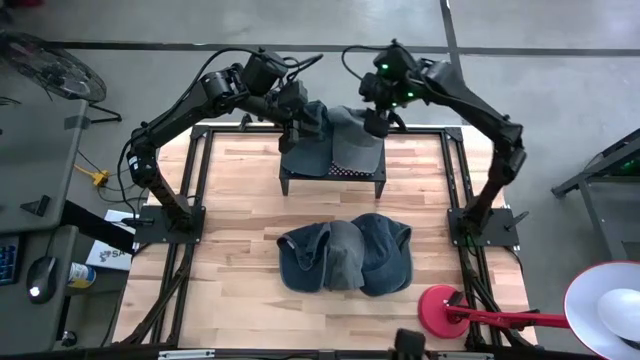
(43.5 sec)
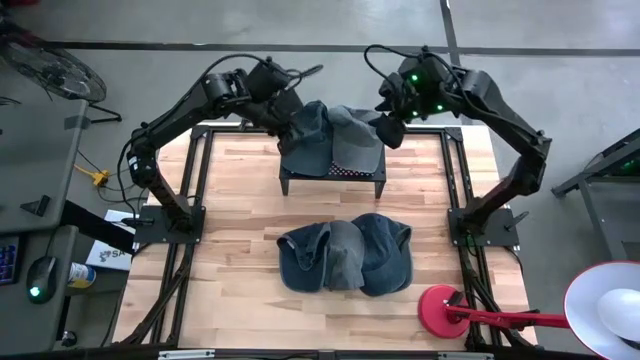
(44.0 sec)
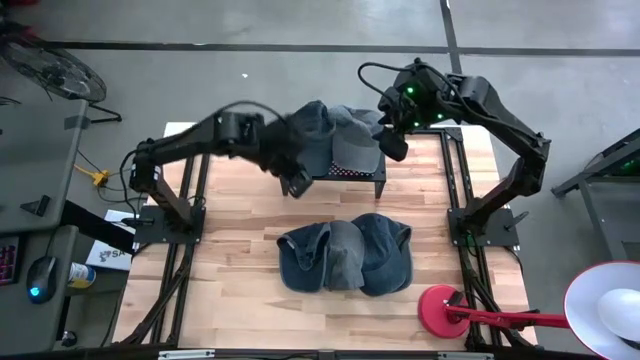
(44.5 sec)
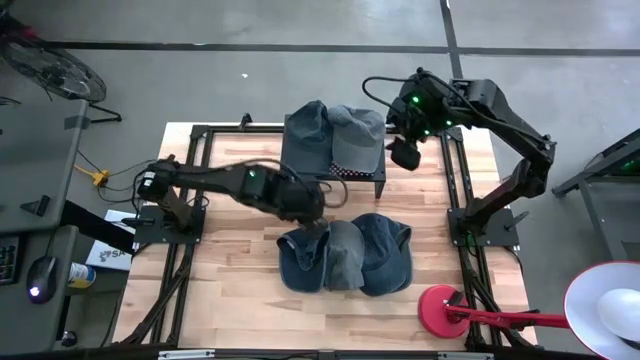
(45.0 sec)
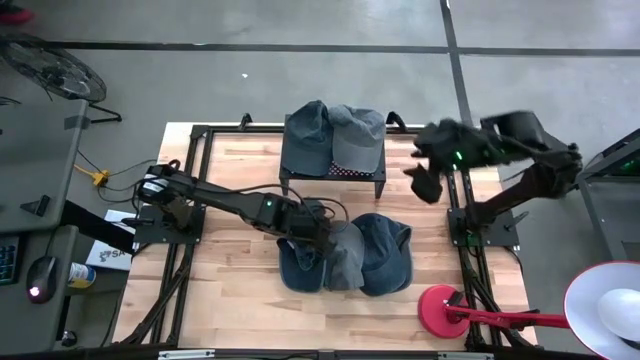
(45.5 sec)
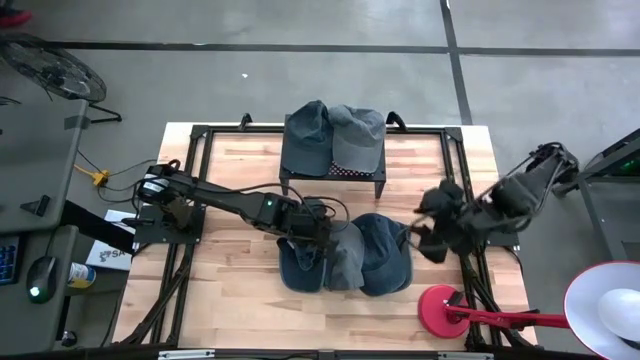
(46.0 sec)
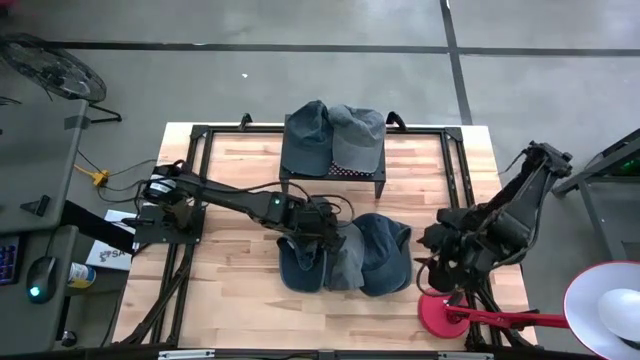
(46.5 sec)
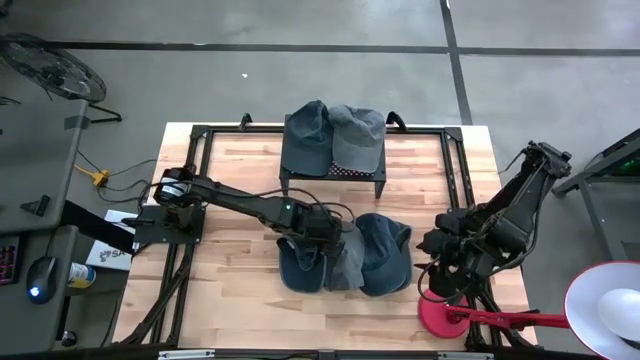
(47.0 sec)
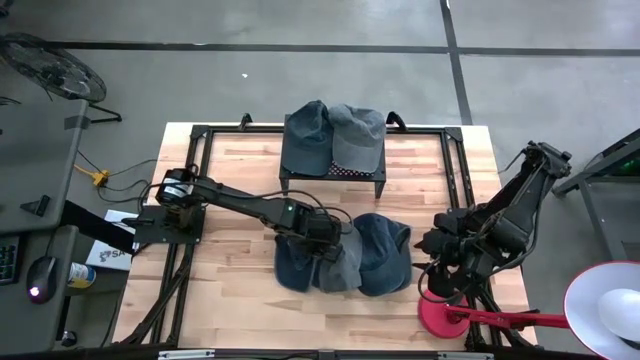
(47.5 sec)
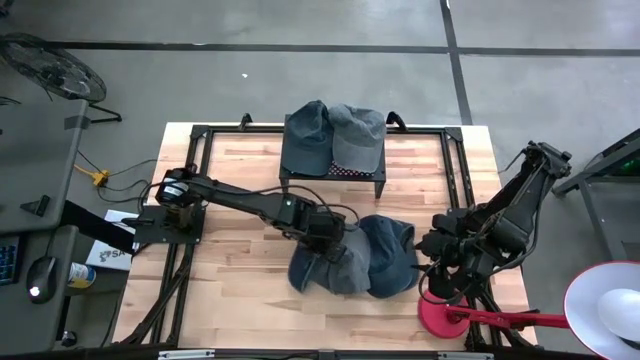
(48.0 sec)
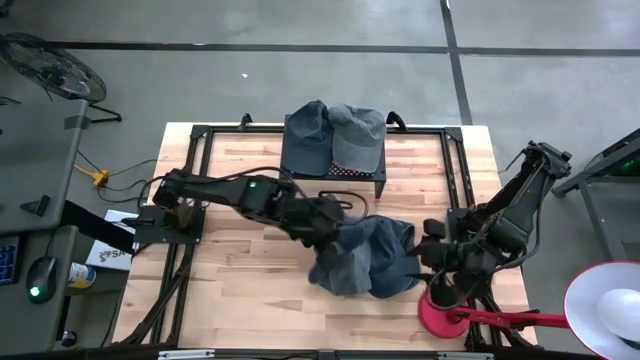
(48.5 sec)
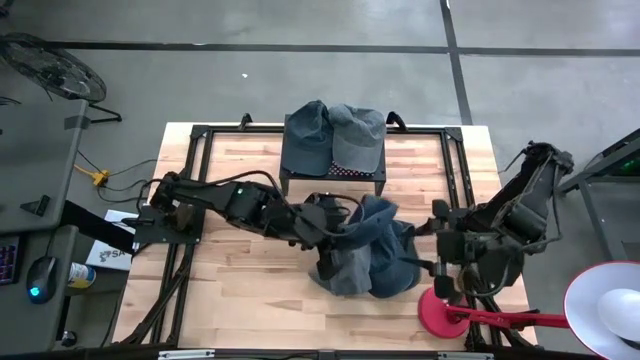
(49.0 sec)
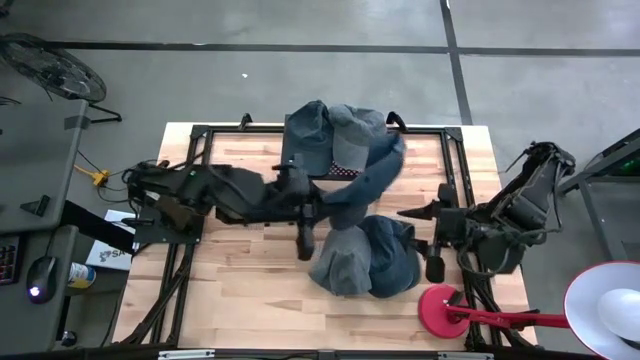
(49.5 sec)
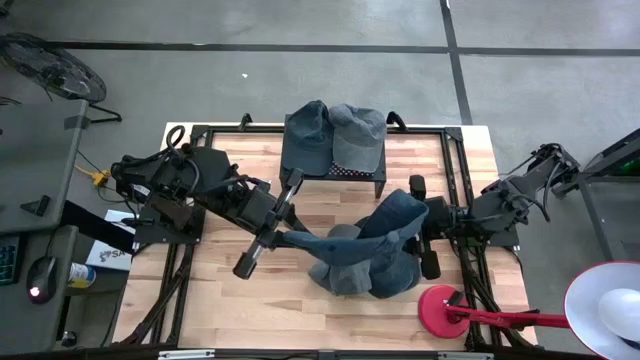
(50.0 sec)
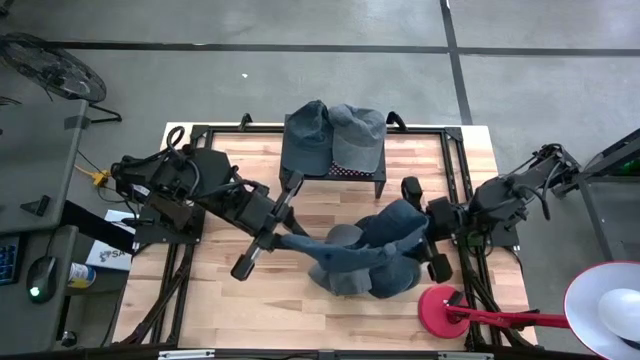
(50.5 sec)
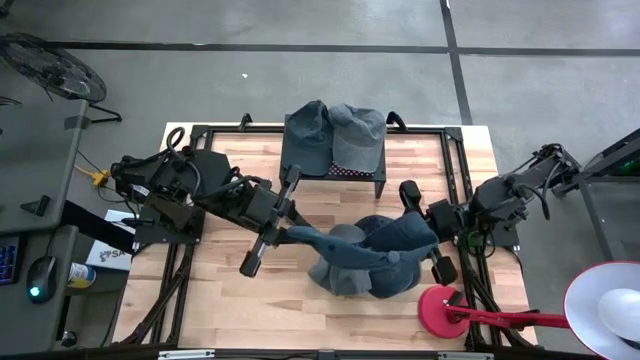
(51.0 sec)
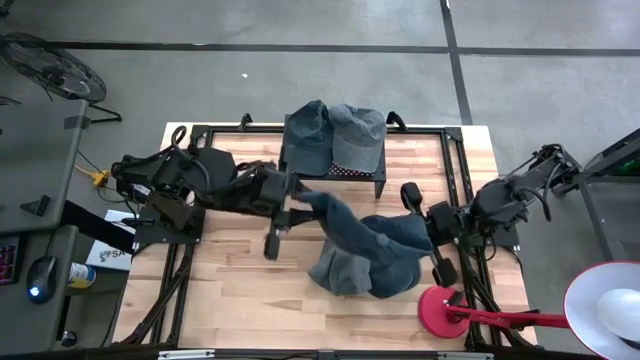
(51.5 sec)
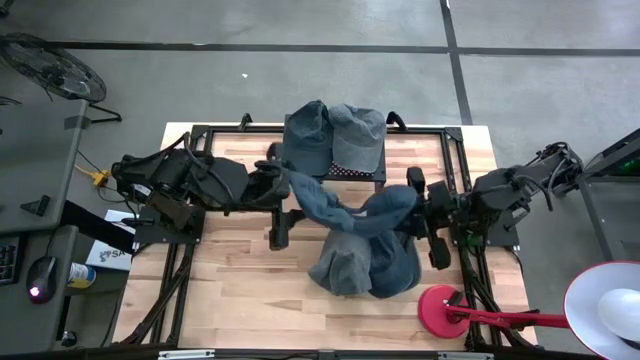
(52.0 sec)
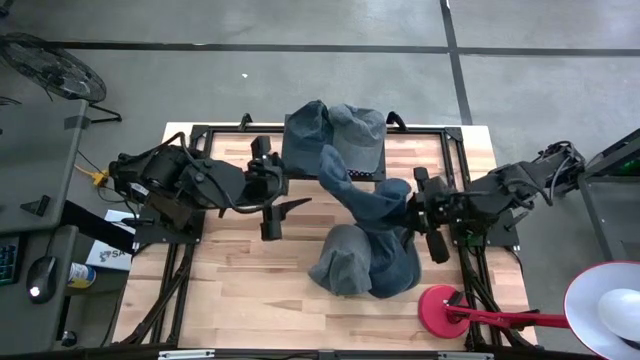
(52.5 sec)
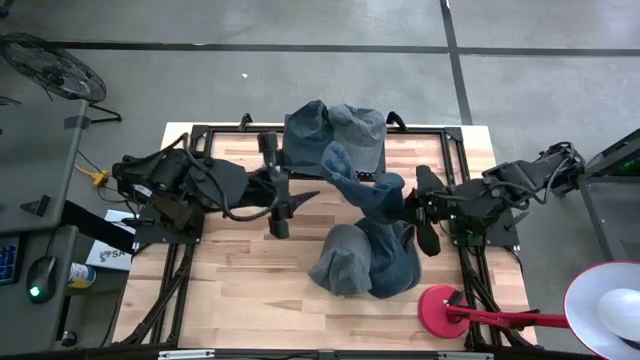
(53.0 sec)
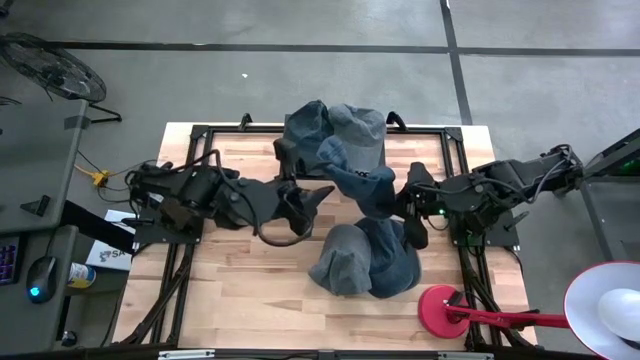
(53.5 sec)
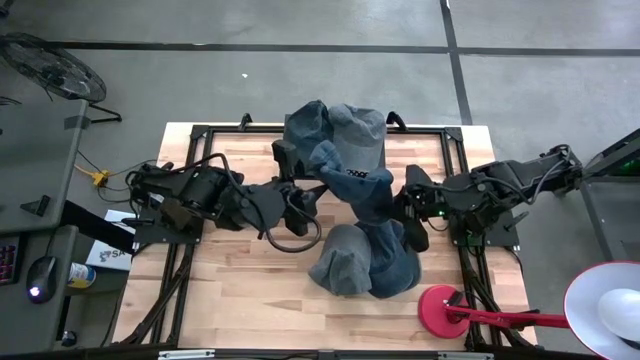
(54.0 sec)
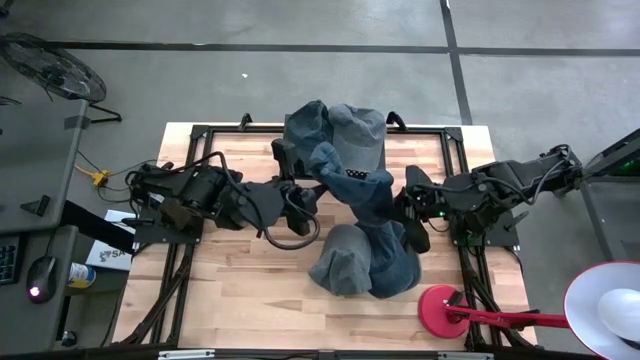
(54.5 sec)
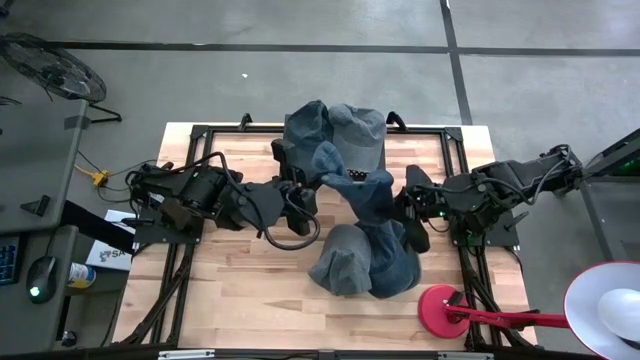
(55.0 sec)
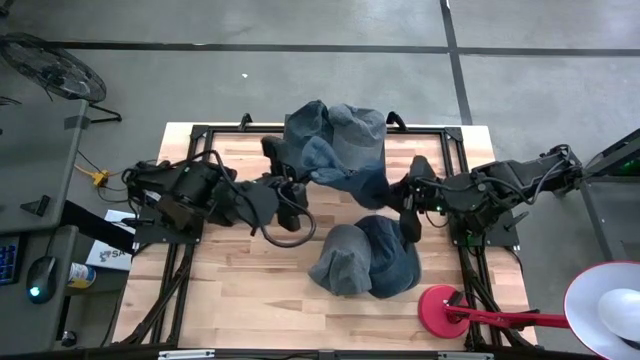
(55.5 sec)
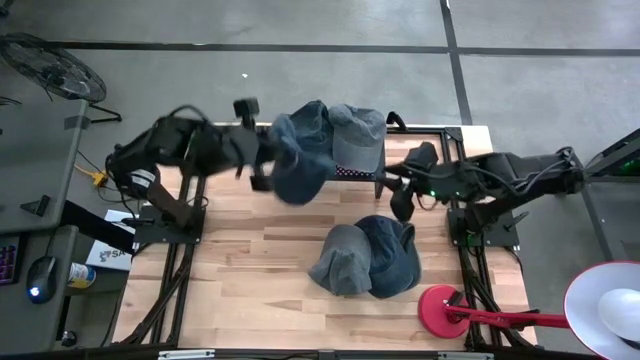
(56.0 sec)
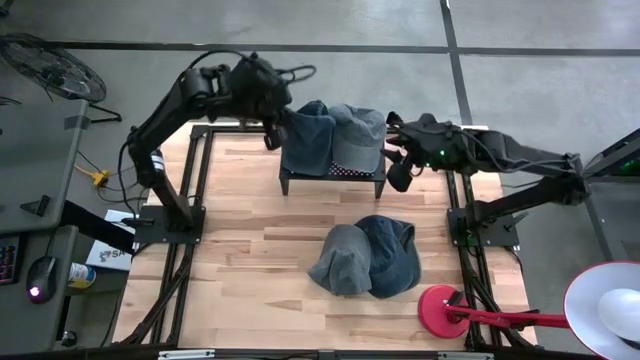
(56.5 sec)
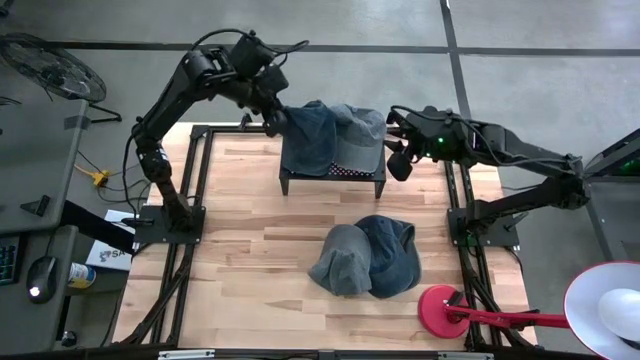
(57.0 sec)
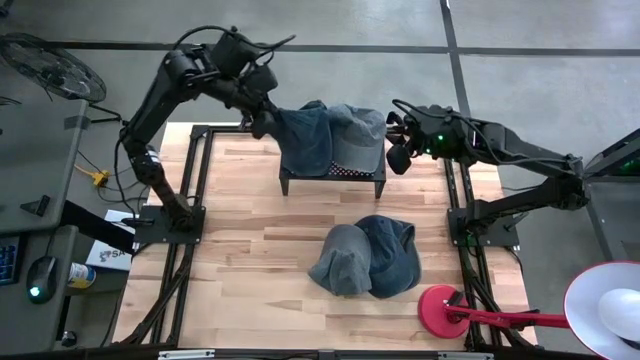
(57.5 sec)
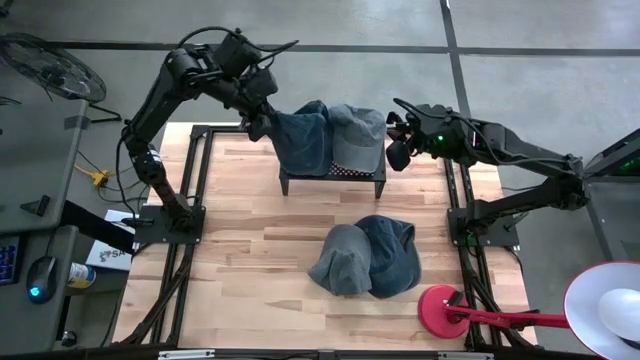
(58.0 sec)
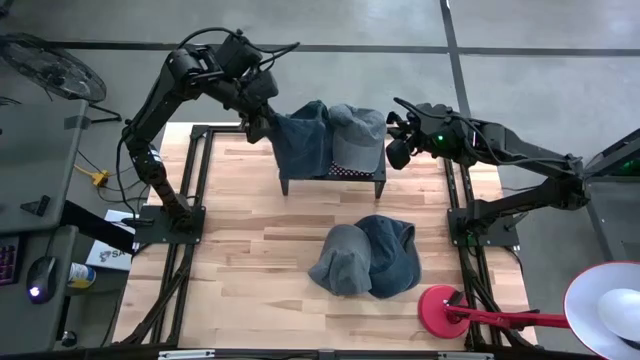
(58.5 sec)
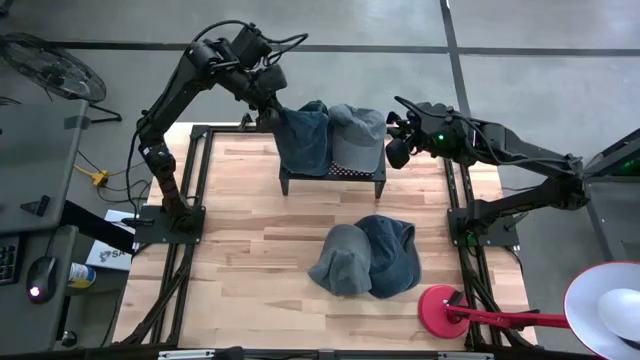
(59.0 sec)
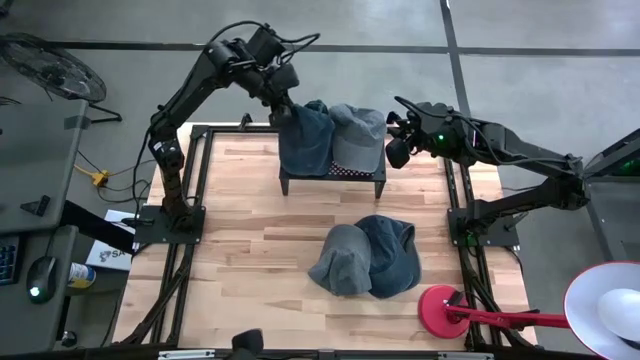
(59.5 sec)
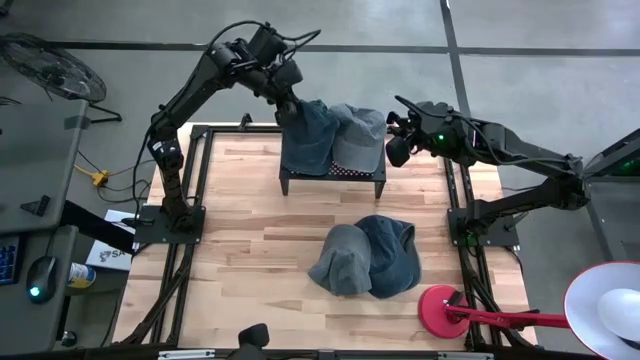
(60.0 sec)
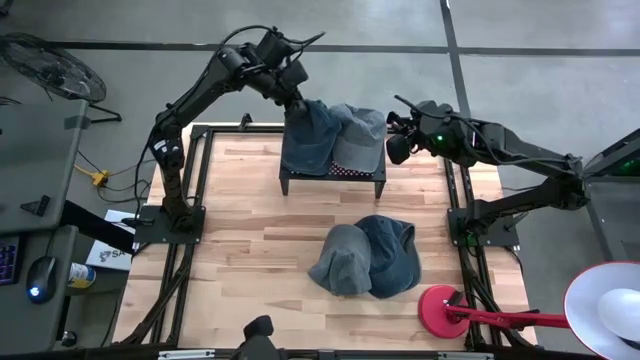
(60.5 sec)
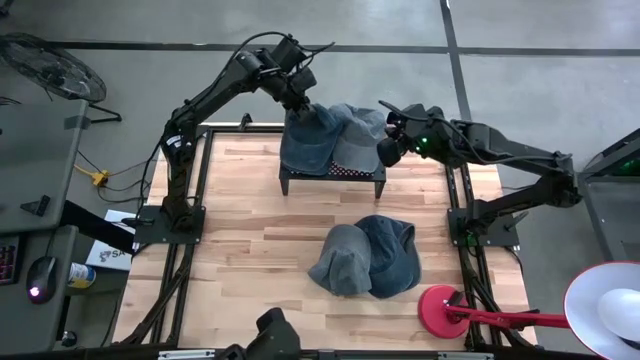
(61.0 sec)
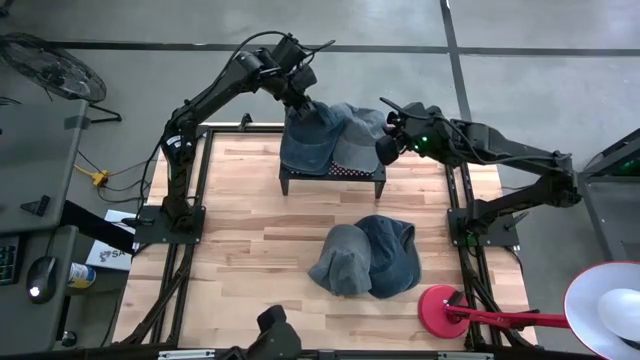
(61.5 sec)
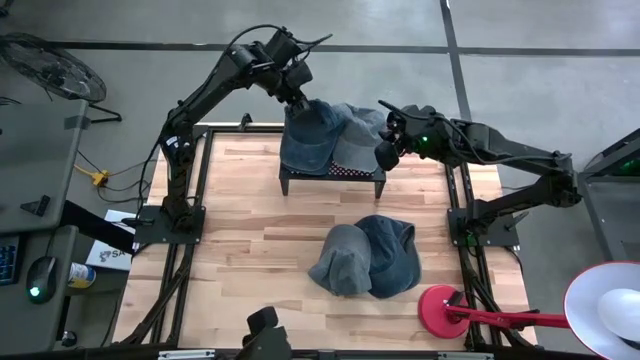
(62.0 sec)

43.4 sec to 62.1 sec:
Task: Pick & Place hat
Stack the left blue cap on the blue cap on the shelf

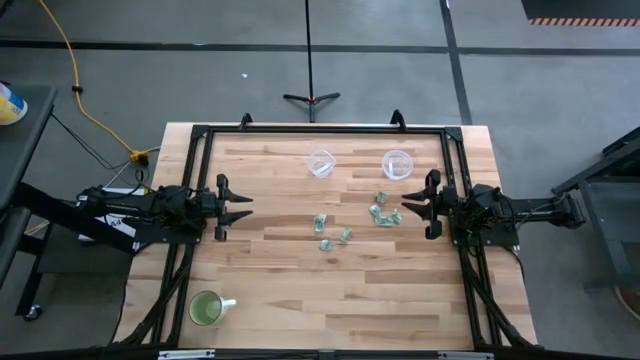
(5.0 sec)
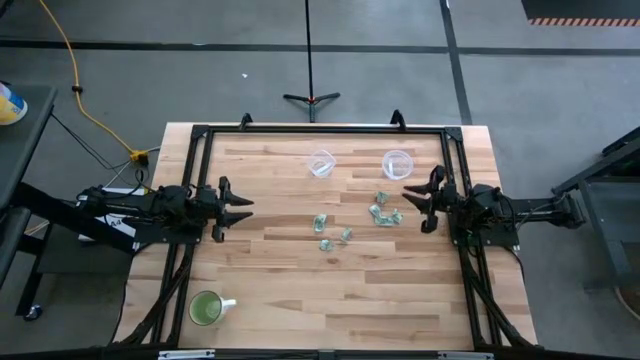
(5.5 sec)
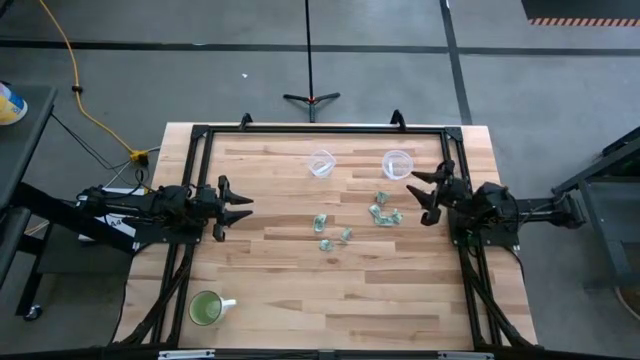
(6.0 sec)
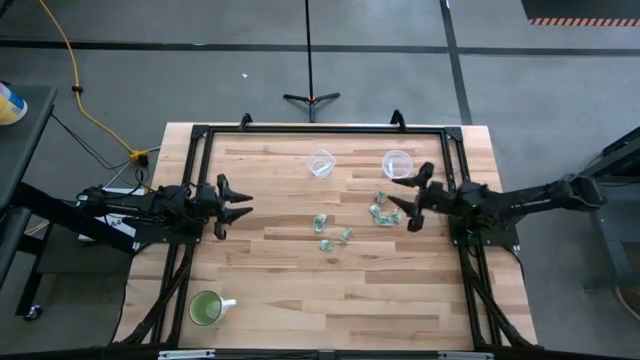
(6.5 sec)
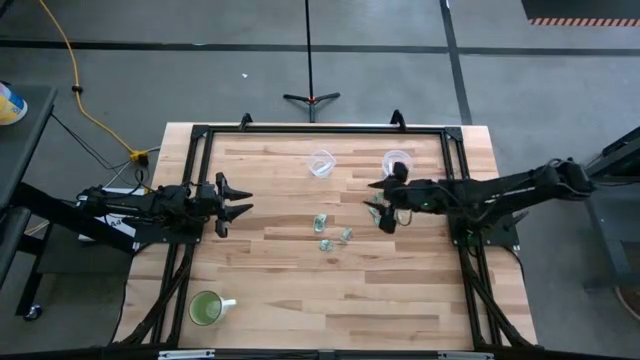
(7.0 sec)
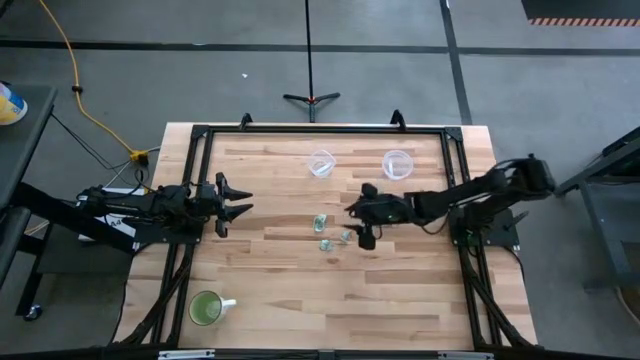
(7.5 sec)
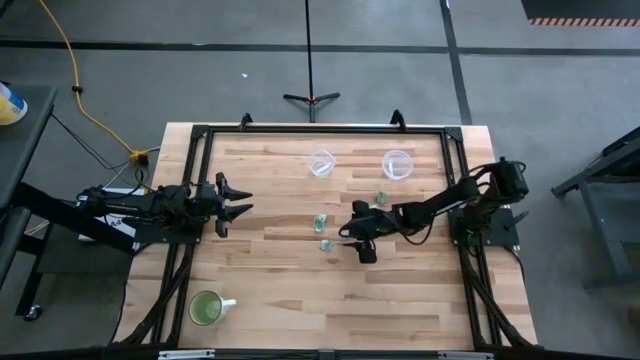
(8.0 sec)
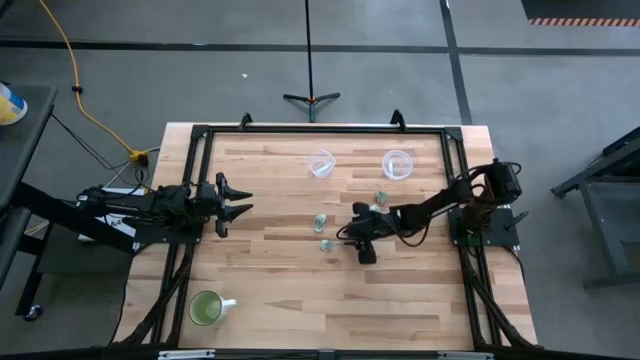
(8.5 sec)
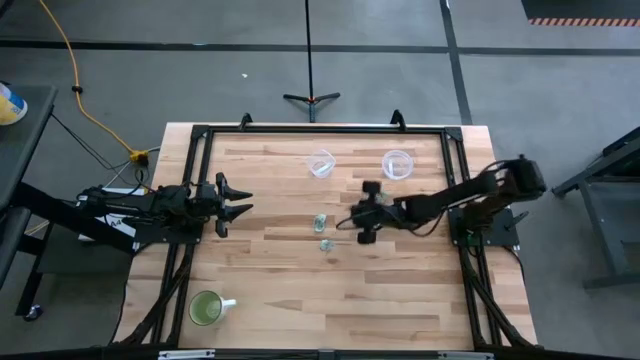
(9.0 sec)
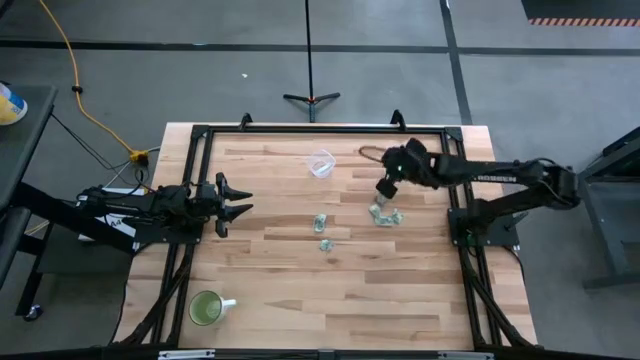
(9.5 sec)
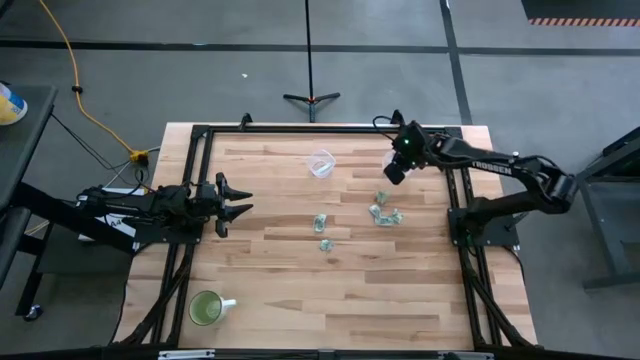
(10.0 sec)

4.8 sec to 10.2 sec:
Task: Pick and place Stevia / Truvia into bins
Put the stevia packet into the right transparent container
